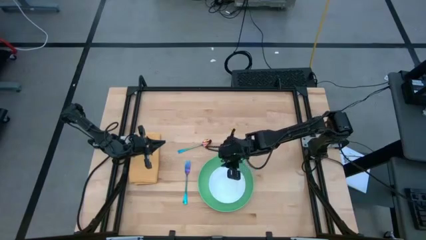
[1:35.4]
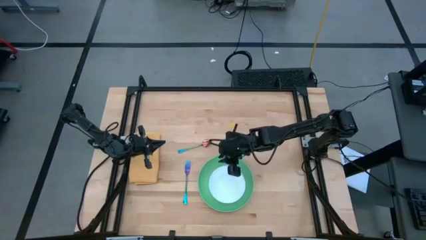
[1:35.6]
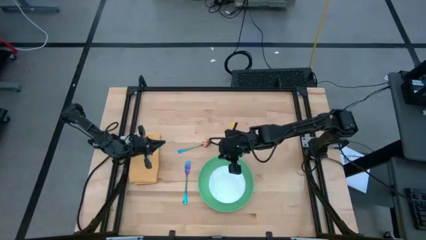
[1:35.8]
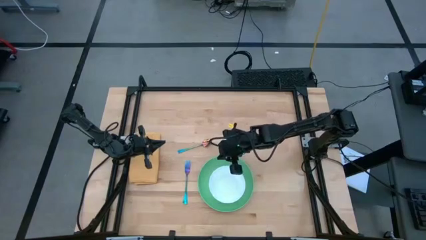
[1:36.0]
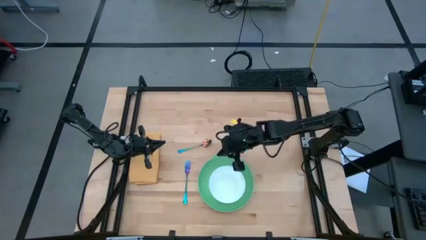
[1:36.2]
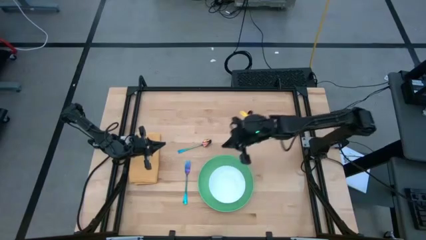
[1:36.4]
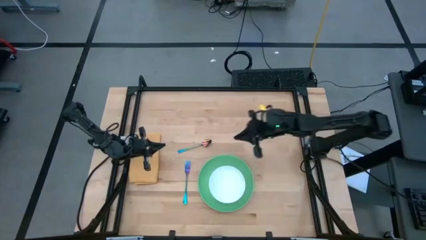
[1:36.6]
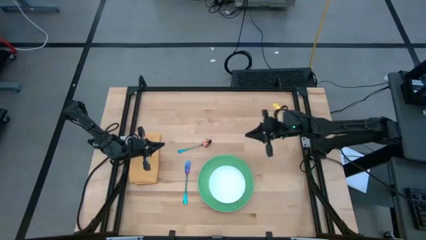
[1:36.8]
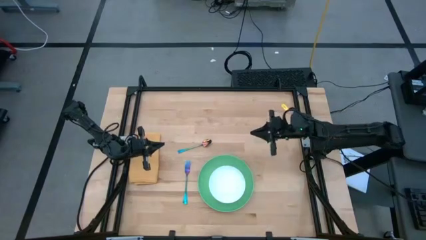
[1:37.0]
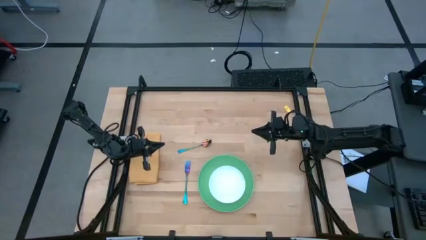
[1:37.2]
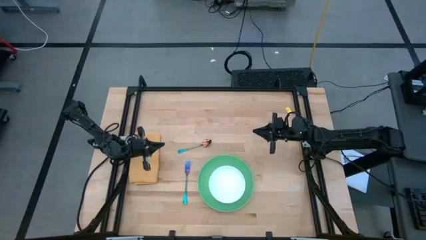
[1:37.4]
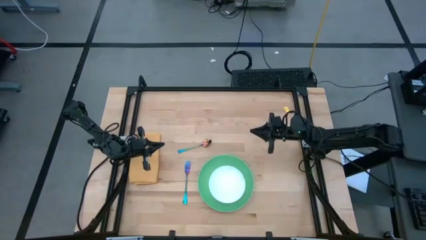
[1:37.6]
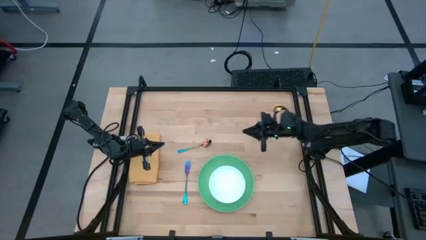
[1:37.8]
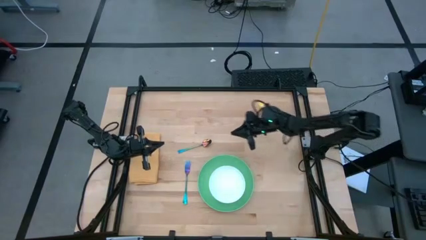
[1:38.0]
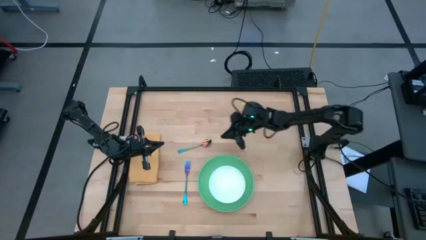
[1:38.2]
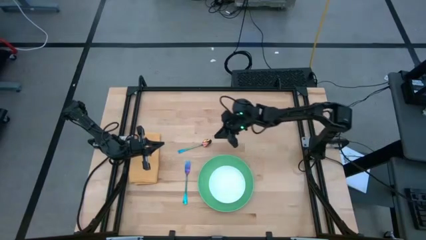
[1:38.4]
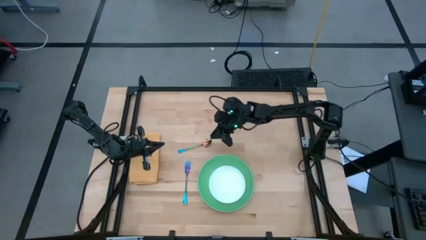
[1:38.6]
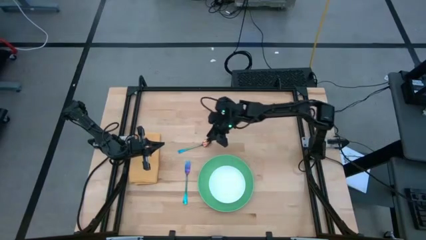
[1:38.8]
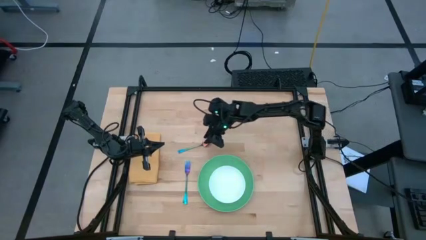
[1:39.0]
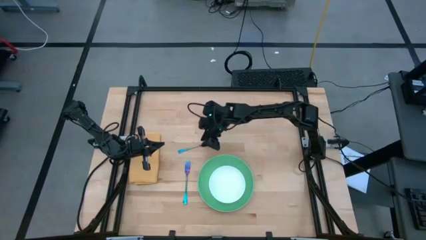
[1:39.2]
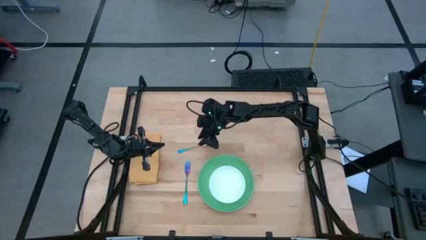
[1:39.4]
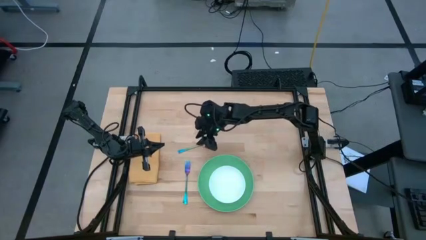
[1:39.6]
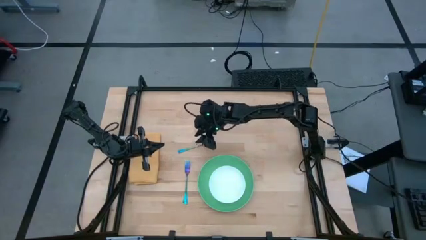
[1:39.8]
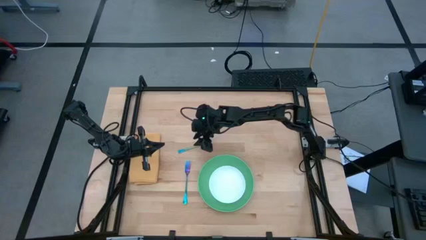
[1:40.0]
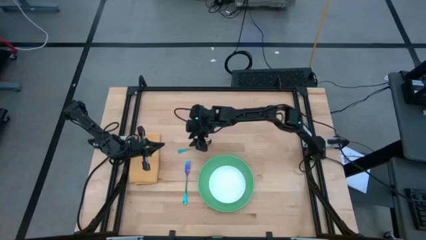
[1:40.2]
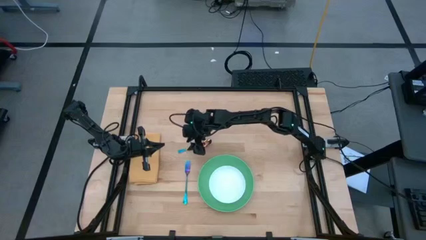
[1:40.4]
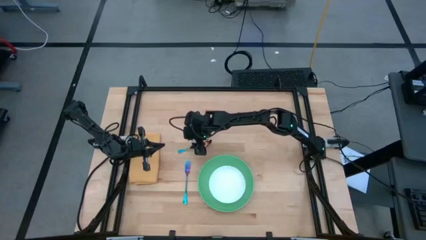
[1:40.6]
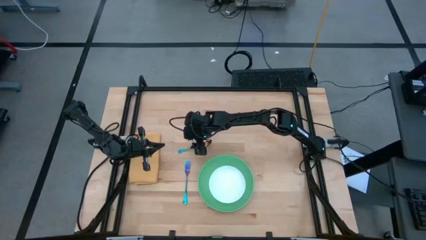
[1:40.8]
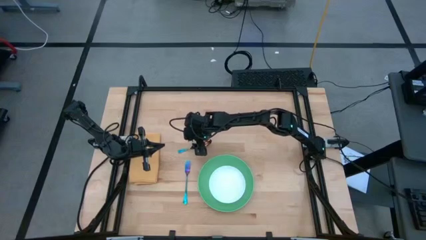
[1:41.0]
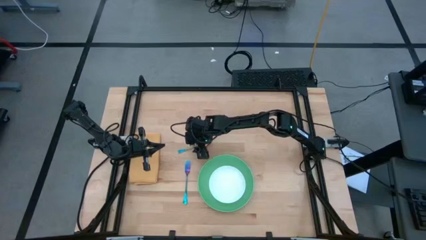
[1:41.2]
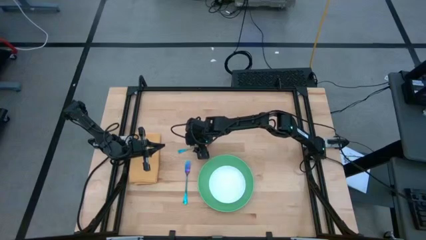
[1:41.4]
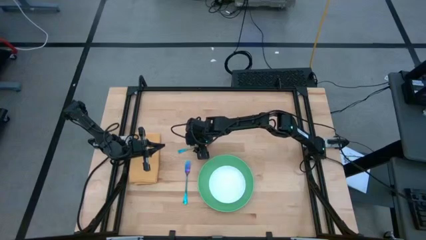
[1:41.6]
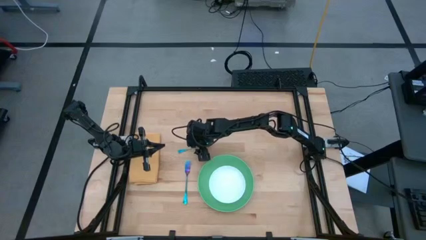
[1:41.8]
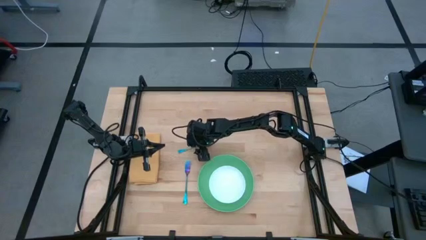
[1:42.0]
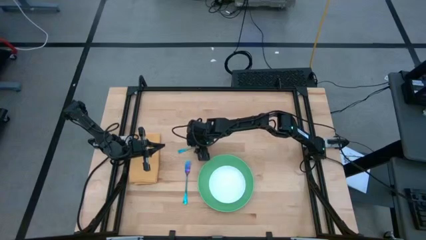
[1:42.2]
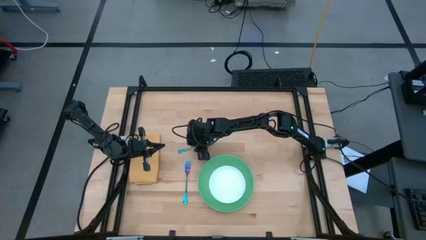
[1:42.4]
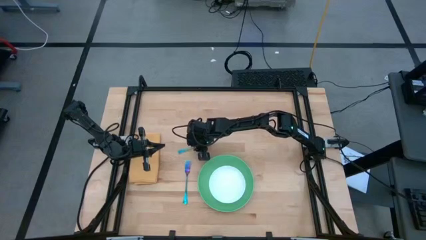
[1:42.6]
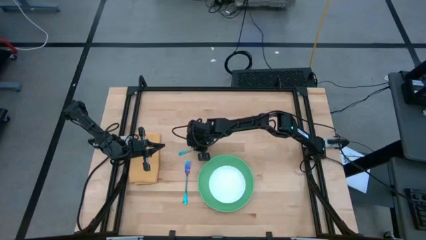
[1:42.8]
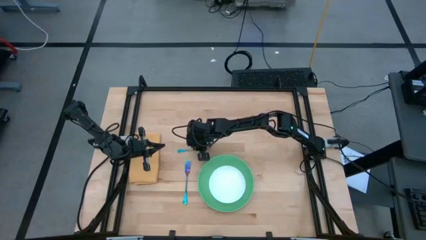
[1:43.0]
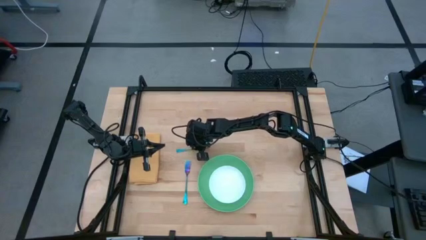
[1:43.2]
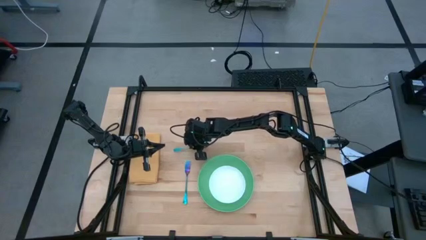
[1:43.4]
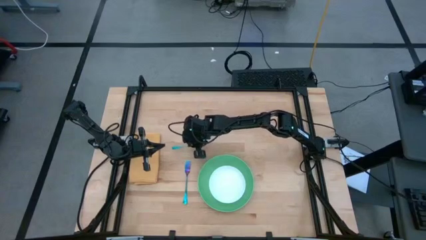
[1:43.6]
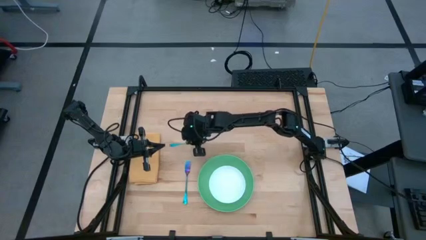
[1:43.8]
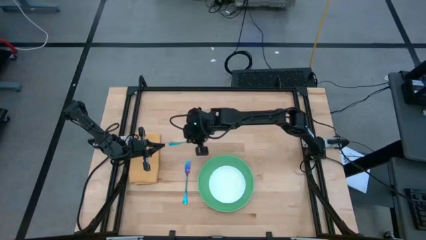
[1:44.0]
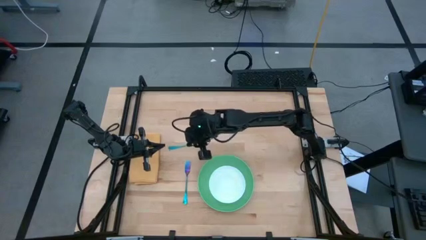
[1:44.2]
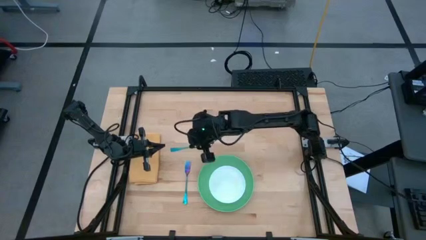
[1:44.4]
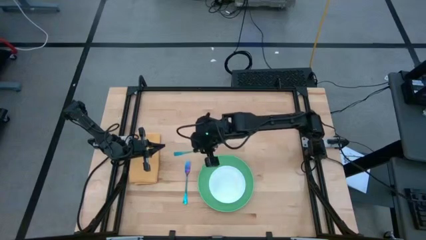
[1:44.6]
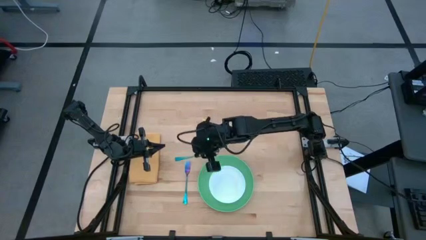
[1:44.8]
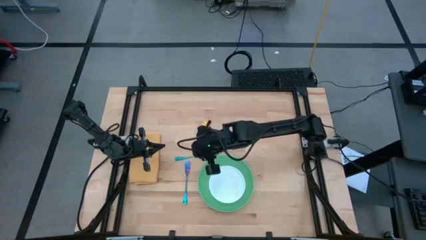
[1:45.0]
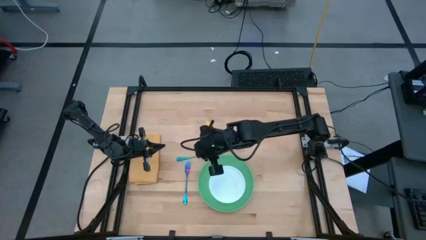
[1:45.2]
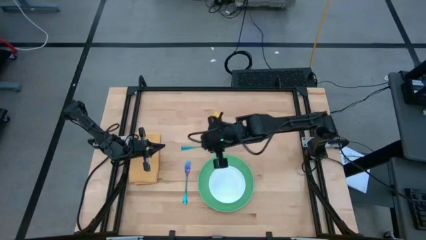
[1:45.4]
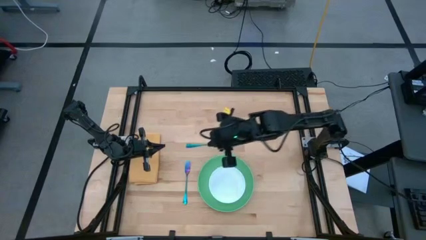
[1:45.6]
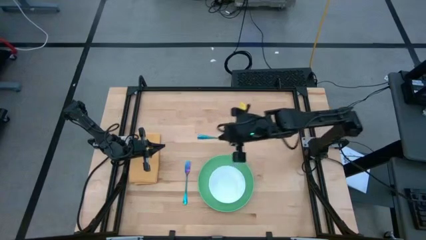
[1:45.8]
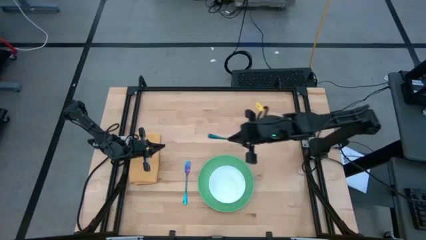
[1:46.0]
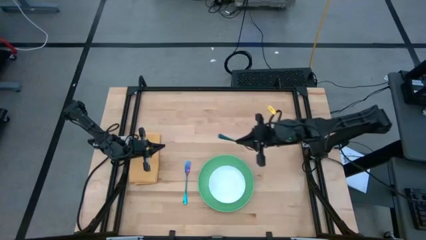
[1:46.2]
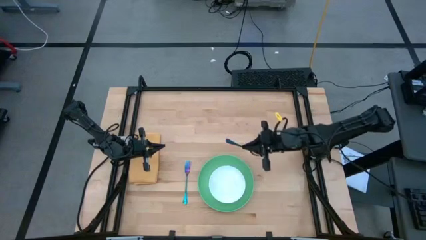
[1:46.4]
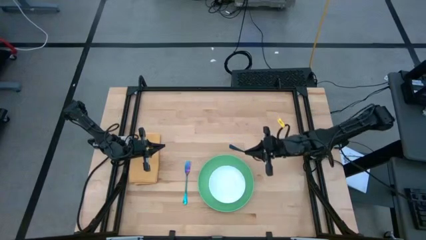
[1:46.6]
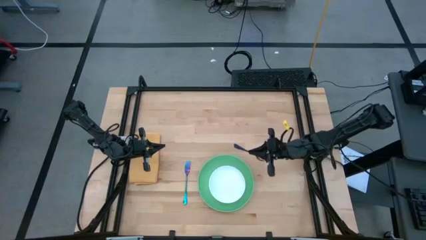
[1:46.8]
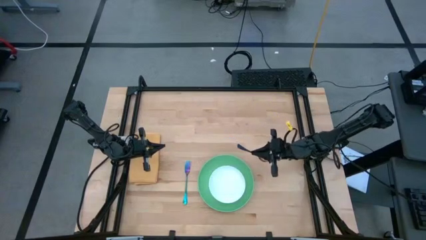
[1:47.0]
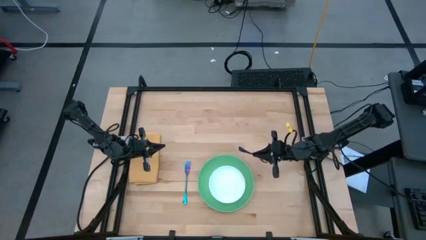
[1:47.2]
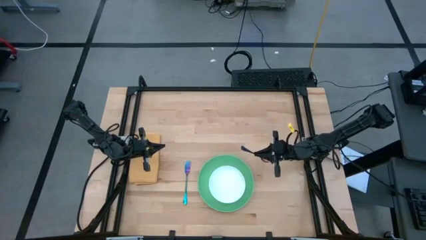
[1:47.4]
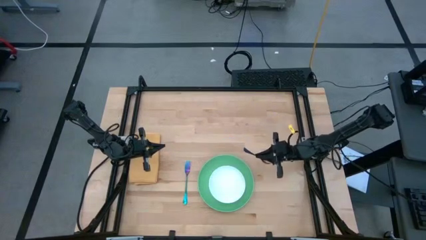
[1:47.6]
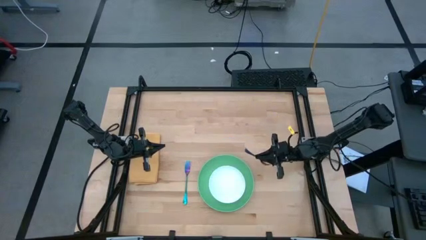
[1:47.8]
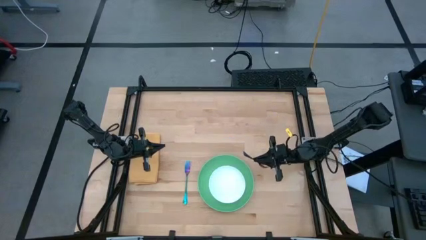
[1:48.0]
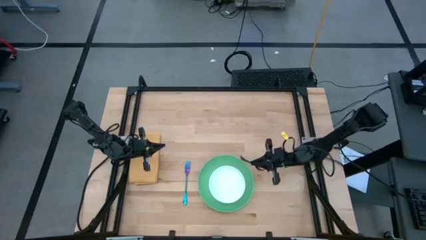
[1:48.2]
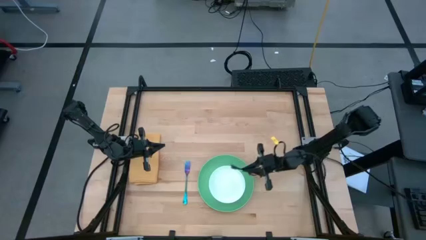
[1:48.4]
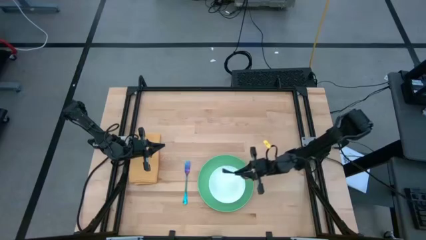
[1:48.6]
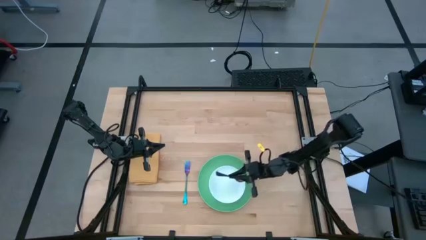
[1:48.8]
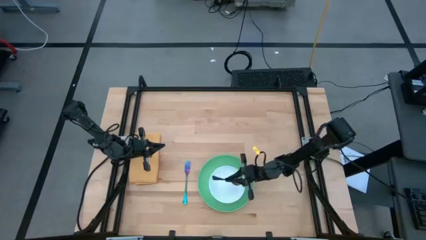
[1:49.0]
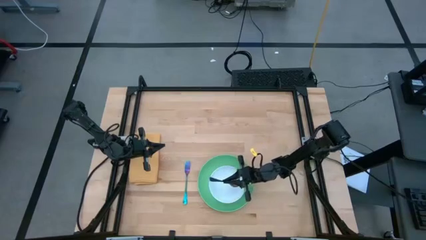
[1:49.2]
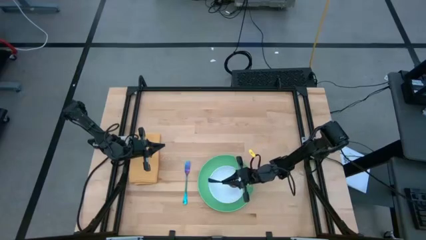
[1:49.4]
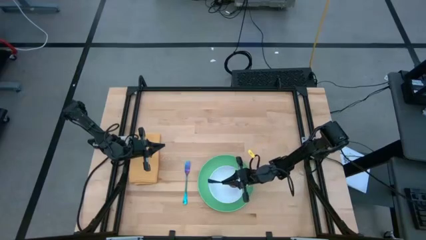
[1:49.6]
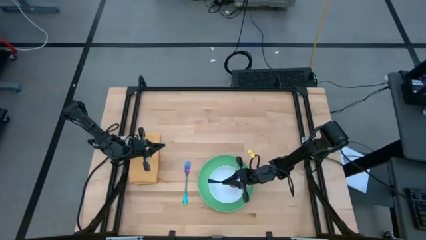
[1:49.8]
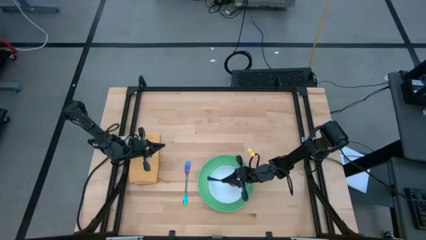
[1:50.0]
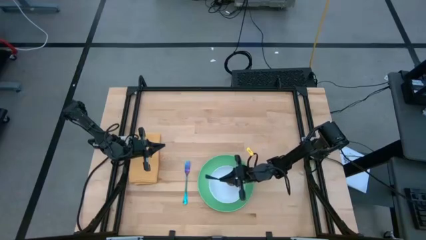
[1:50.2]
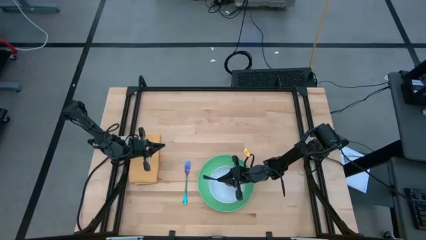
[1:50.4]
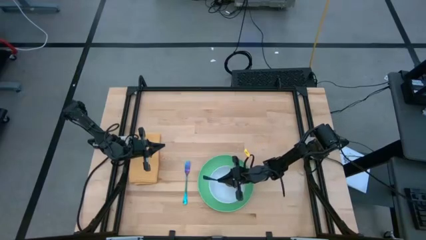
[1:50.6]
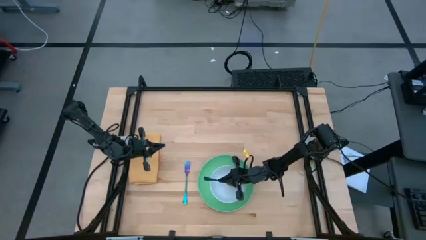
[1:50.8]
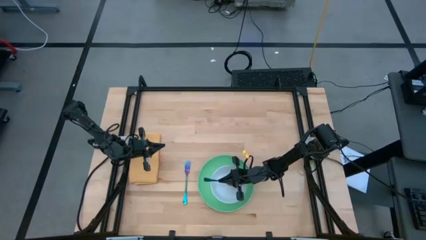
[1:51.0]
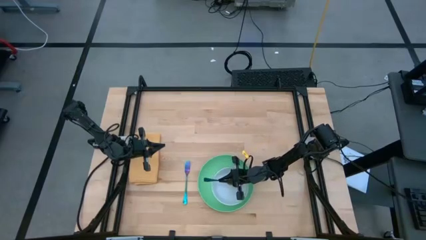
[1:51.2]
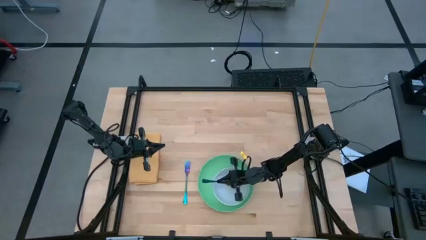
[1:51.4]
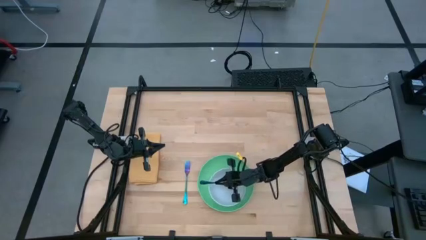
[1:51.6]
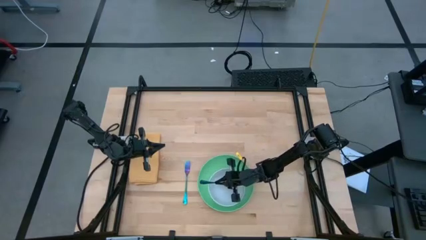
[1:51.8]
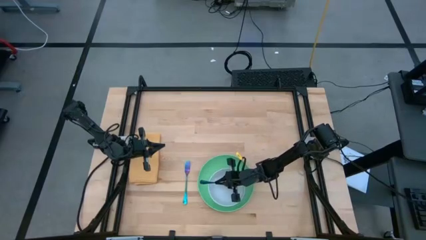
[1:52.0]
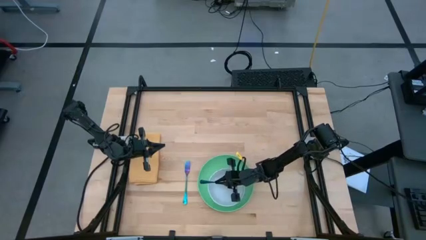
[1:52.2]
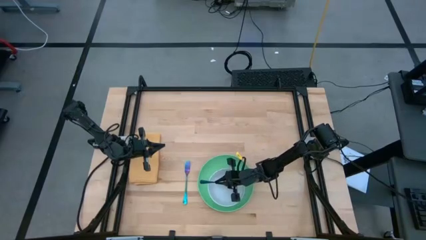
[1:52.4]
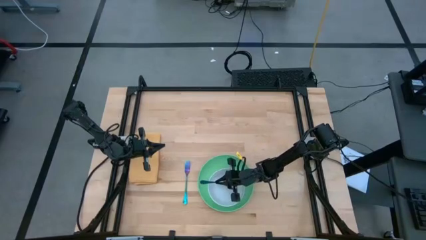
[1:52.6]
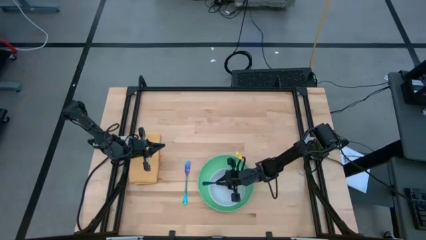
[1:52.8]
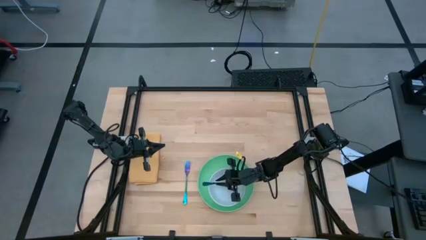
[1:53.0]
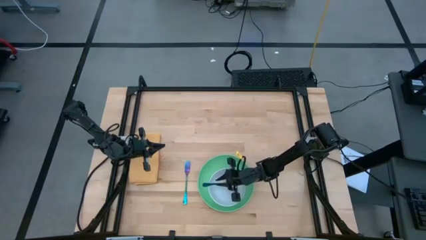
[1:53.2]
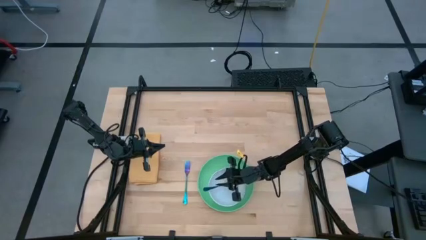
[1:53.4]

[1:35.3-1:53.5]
Task: Set table place
Put the violet spoon on the white bowl
